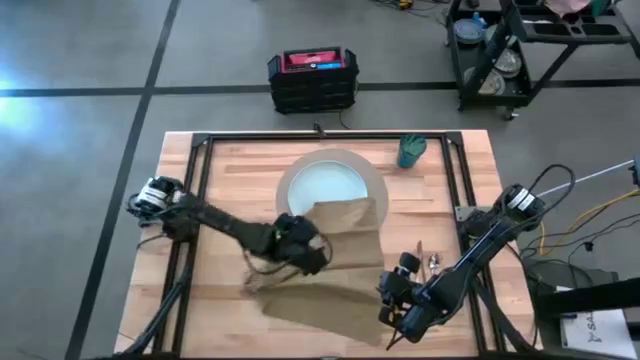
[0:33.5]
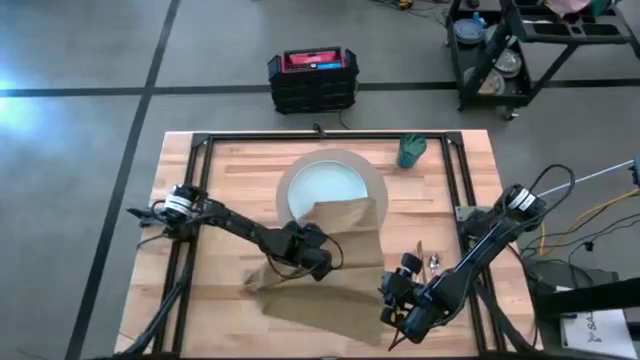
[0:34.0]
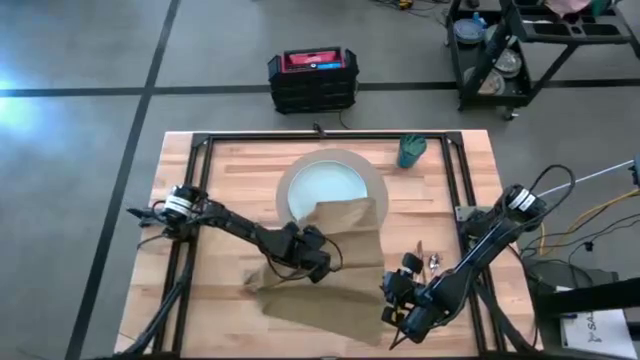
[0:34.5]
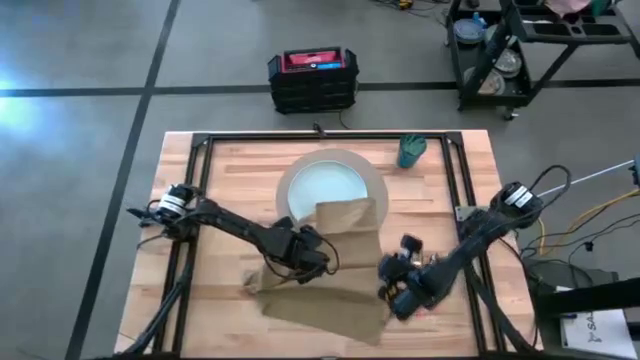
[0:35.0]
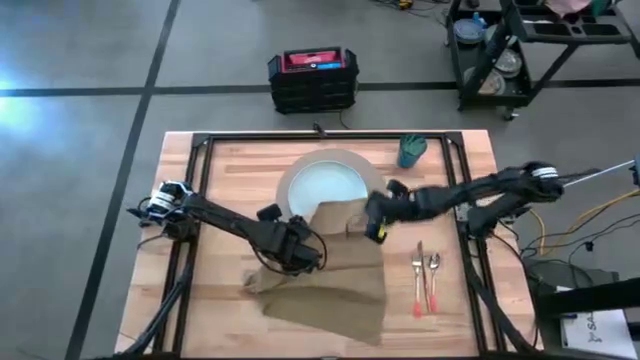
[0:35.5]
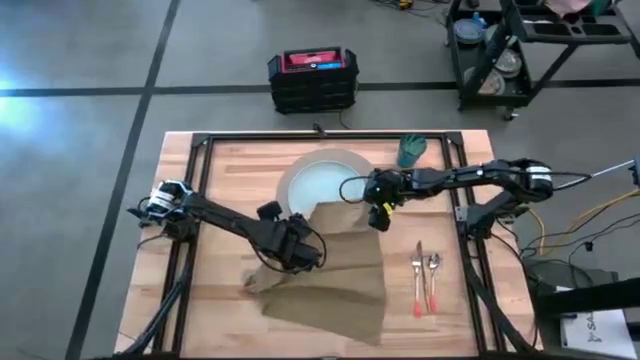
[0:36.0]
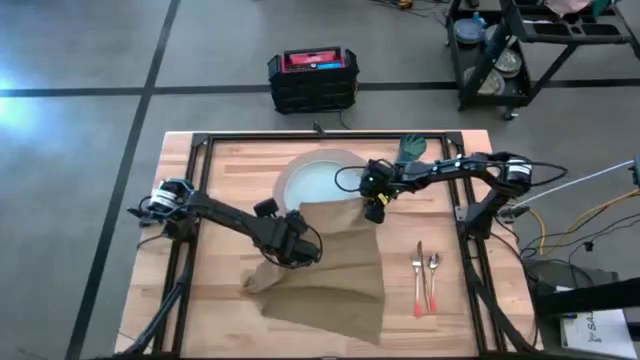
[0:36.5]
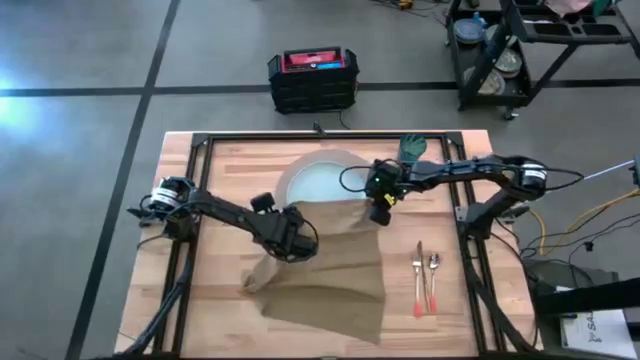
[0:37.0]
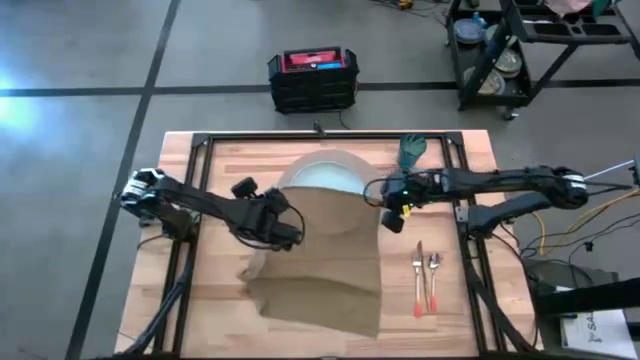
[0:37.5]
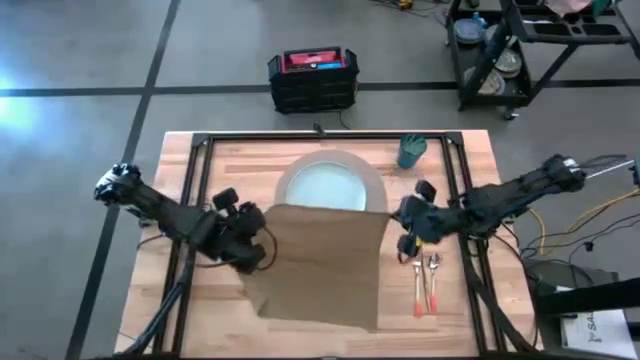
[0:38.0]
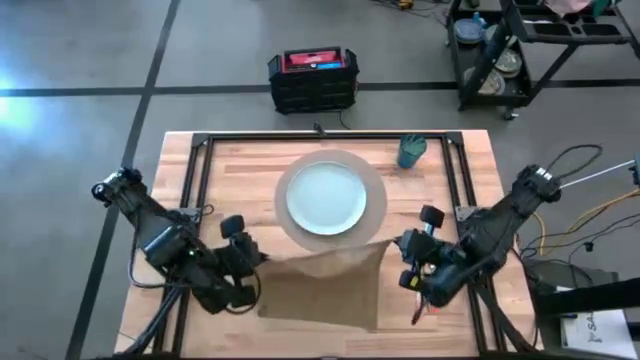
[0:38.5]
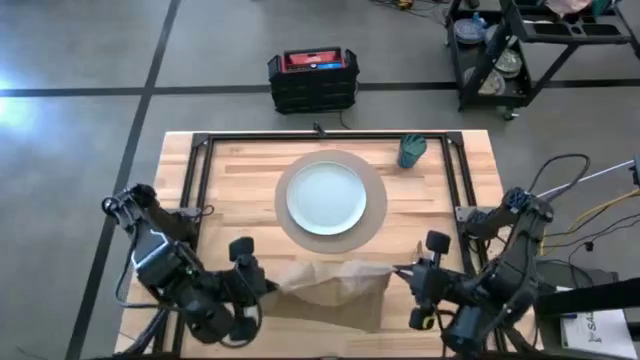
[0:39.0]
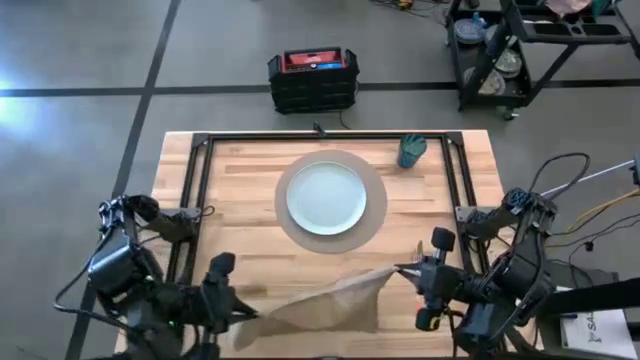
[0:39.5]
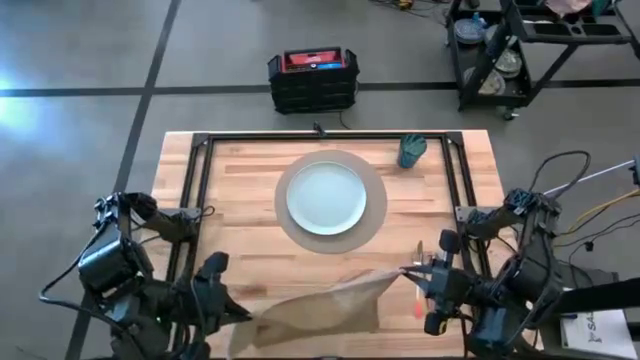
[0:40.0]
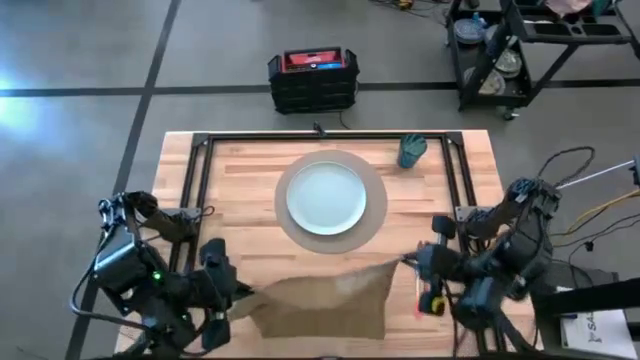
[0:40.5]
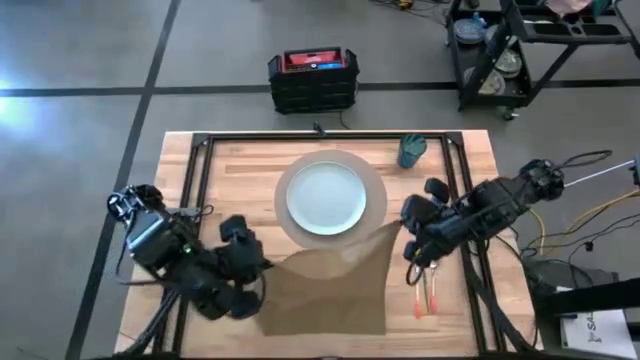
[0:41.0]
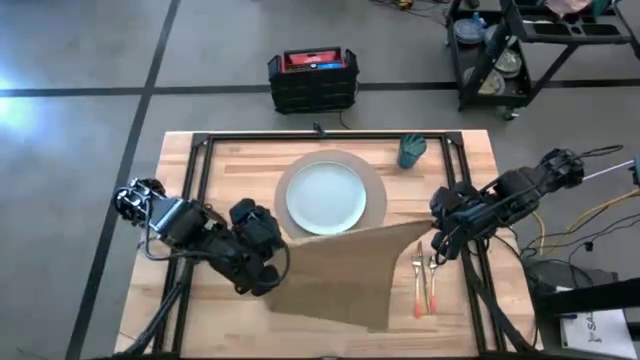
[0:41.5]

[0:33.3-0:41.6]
Task: Set table place
Fold the brown table napkin

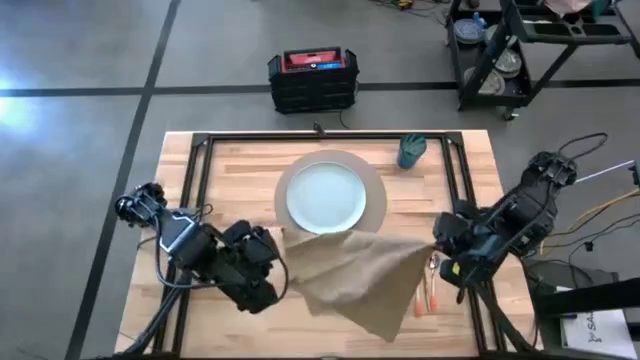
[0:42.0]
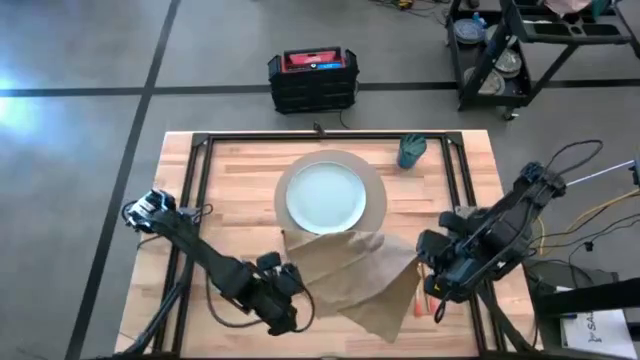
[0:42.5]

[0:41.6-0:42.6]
Fold the brown table napkin

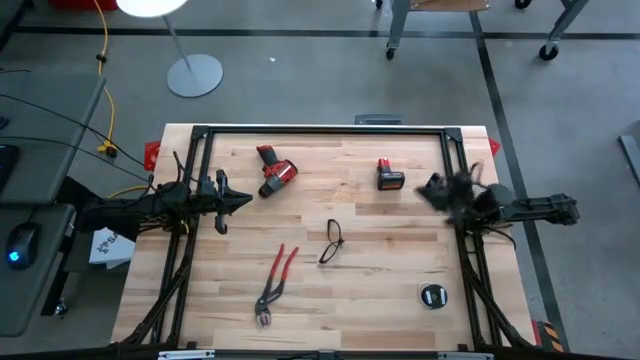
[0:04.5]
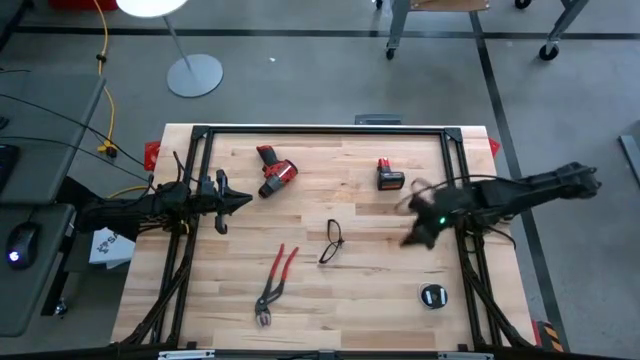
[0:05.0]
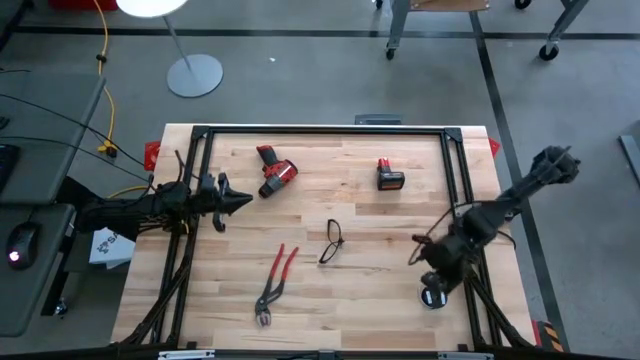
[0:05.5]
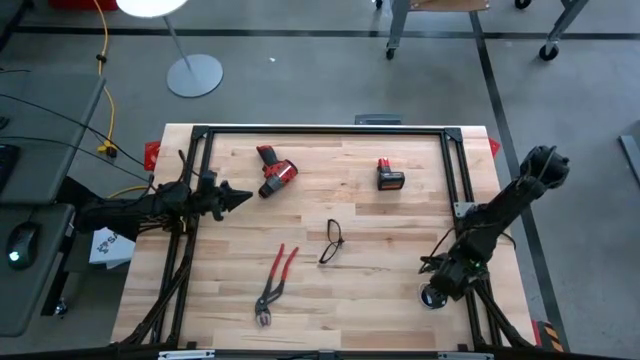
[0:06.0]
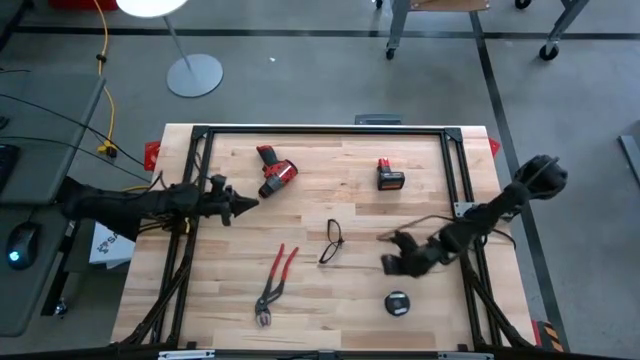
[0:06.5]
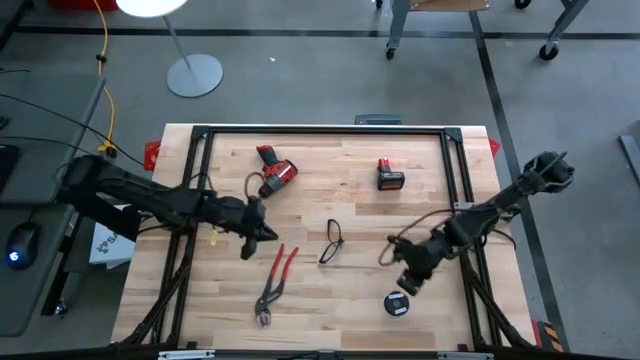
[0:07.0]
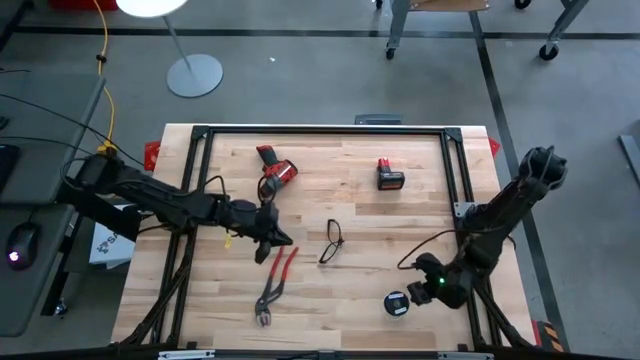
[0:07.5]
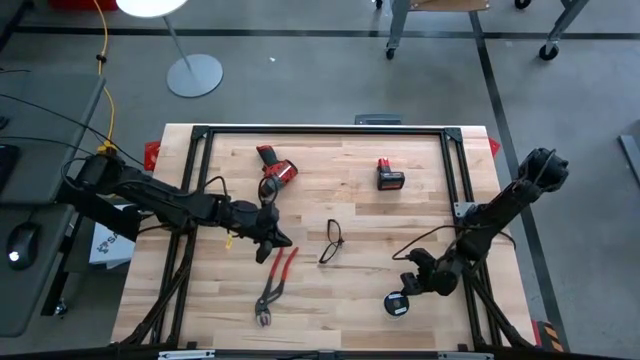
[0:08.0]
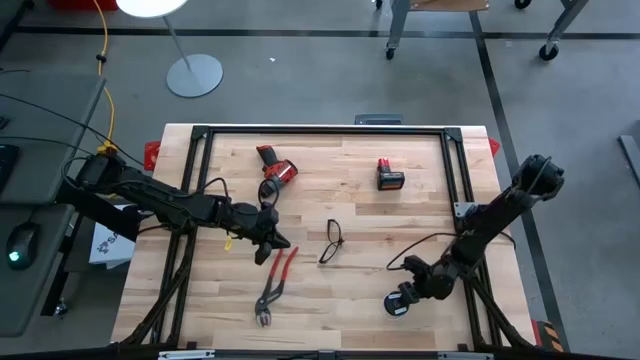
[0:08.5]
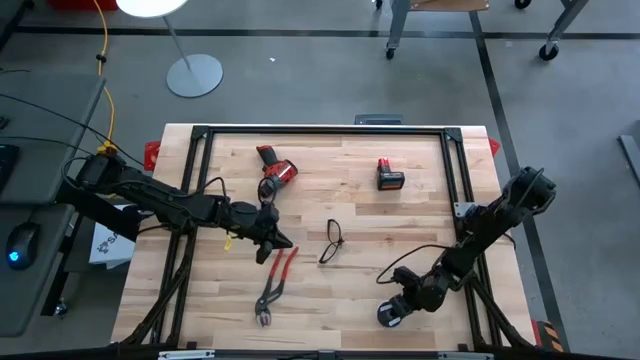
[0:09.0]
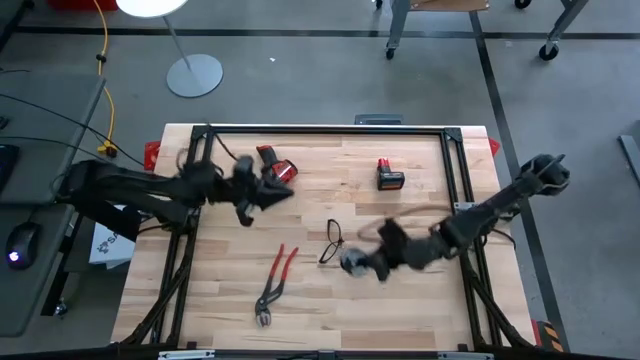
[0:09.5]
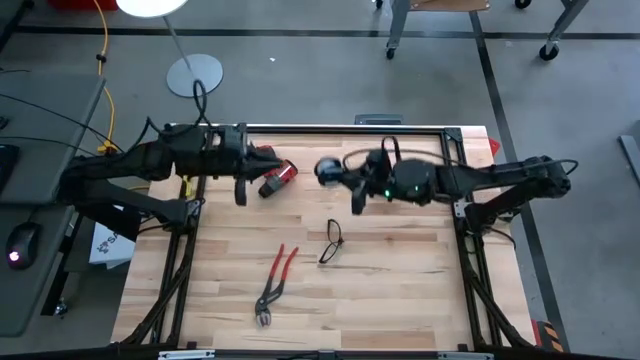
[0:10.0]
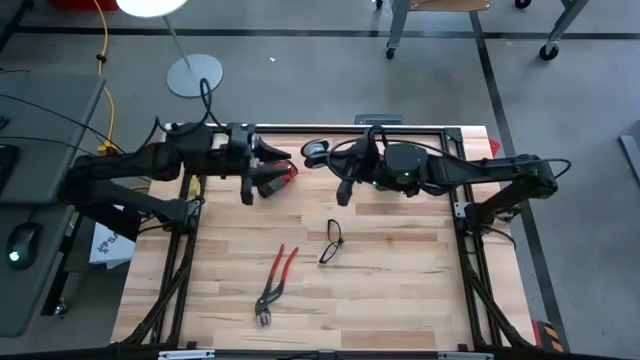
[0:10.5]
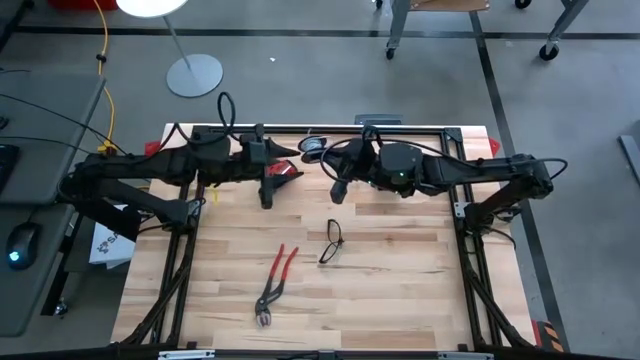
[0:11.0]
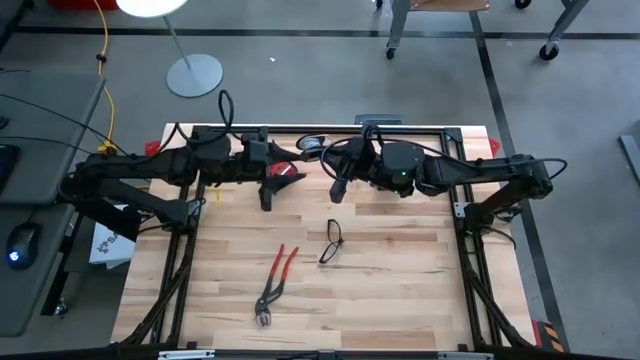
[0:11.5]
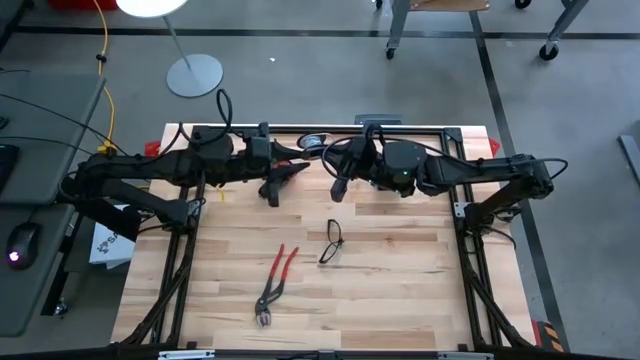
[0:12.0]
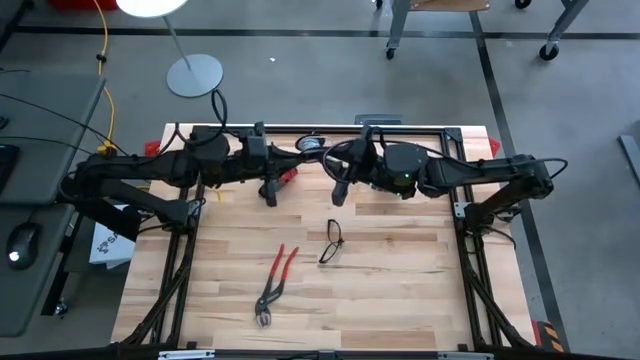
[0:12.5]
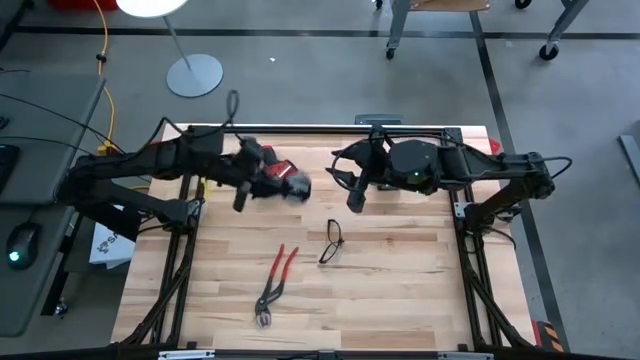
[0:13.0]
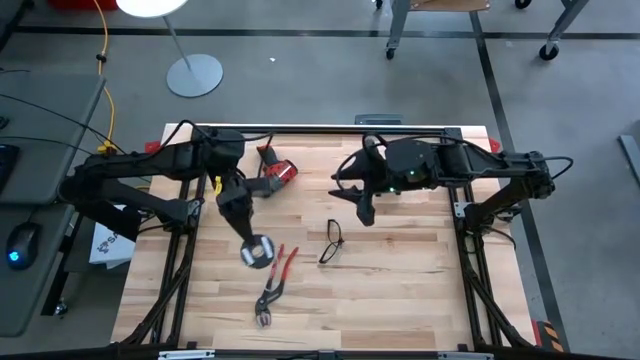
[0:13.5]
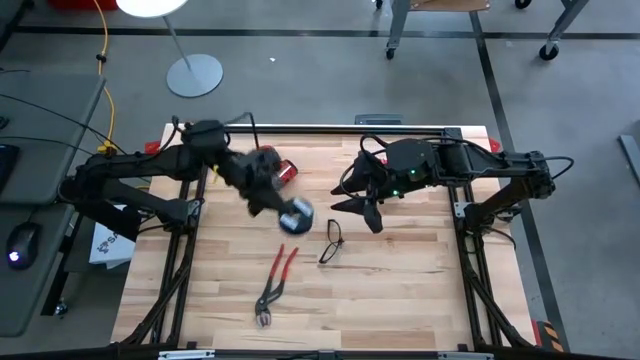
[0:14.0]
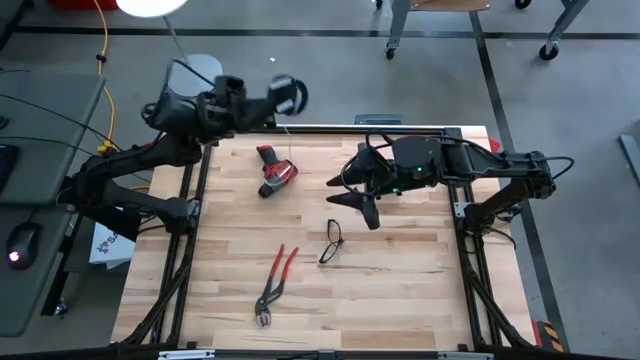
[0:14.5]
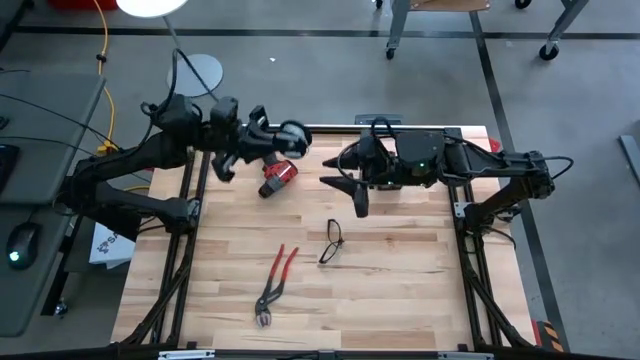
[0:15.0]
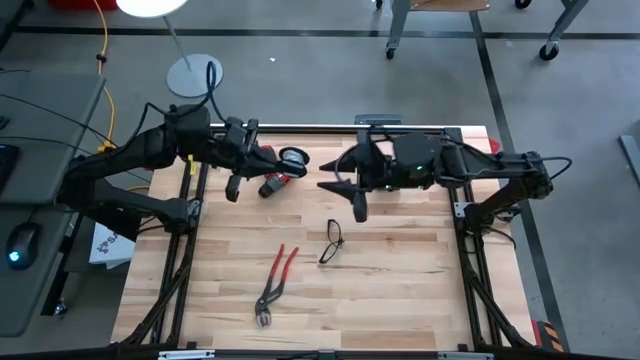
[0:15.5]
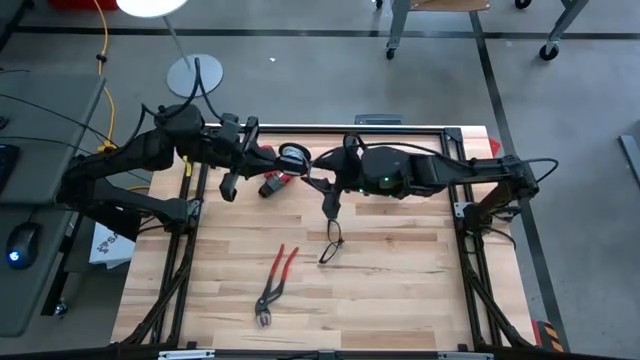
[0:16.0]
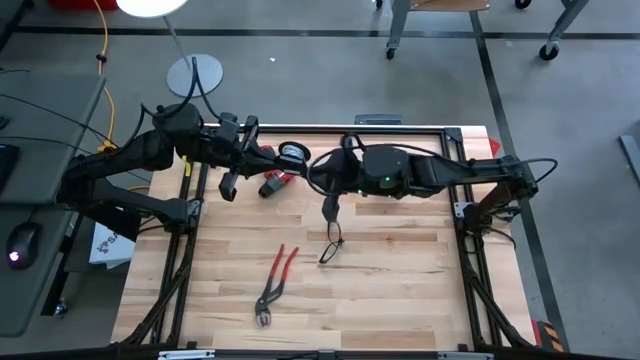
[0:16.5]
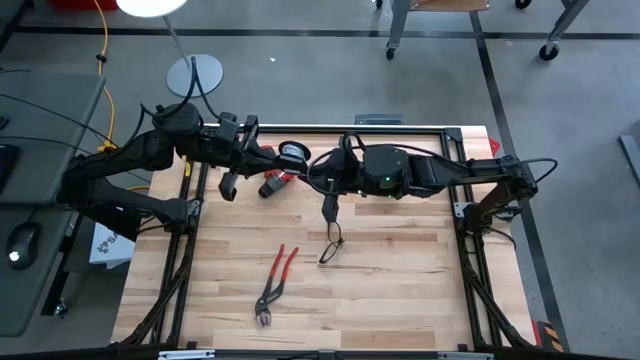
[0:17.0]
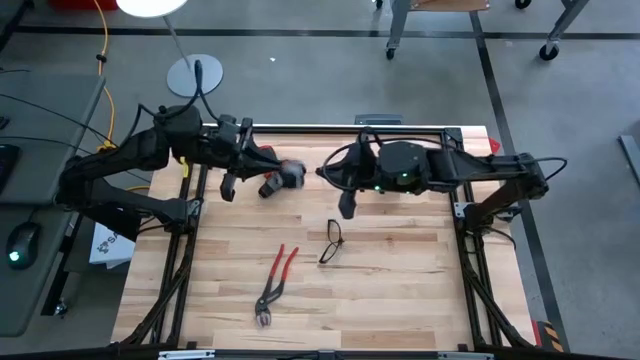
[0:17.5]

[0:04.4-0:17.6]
Task: Coil cords
Uncoil the white wire from the black spool
